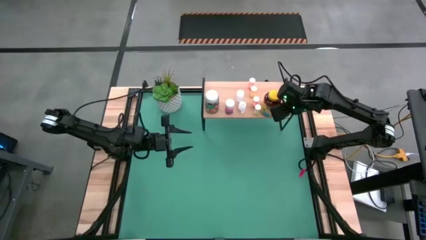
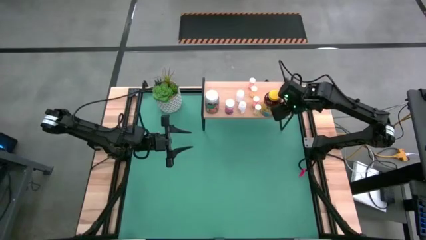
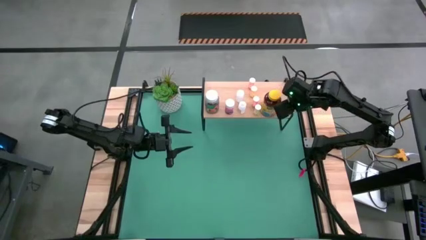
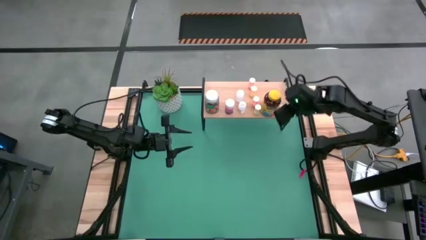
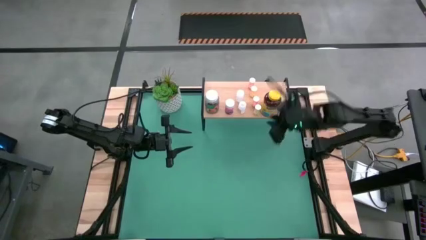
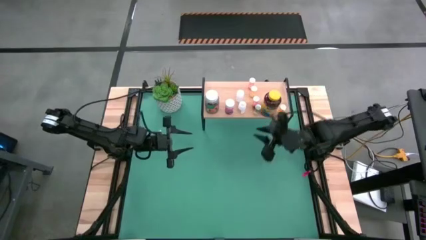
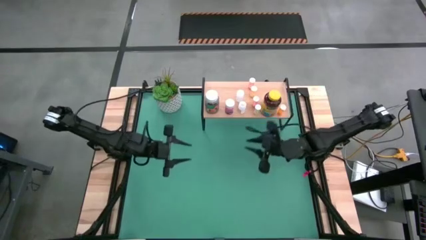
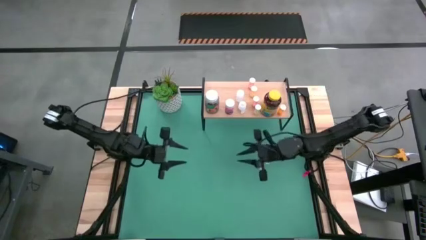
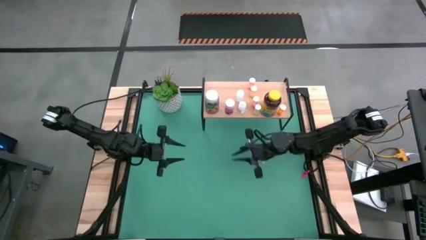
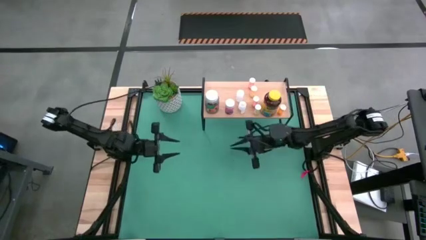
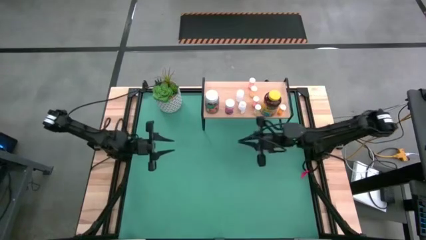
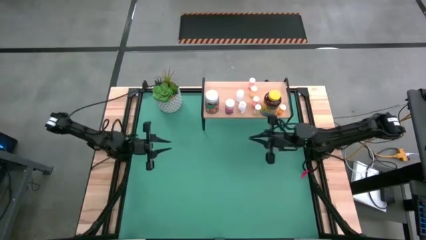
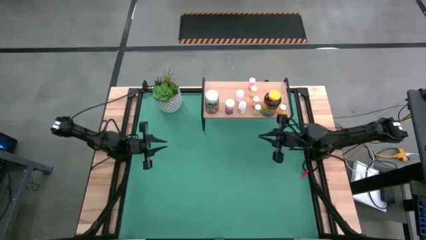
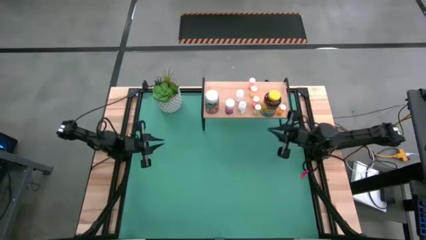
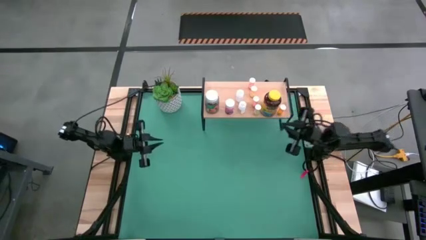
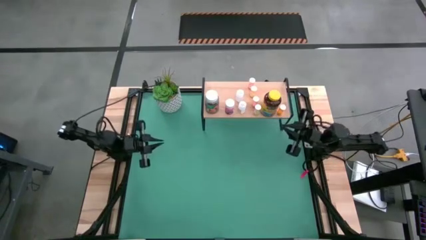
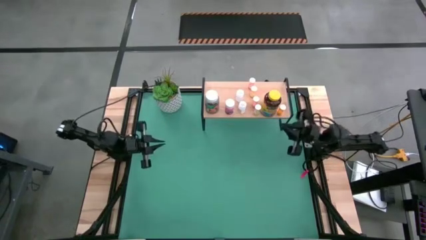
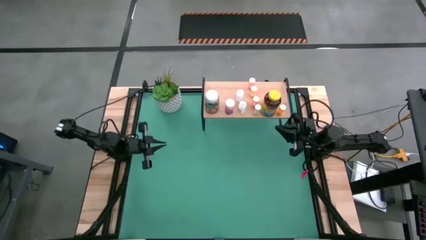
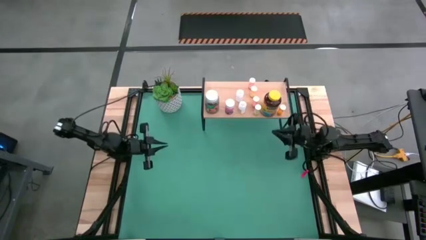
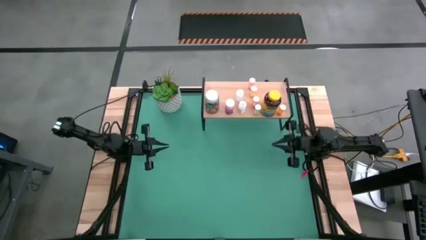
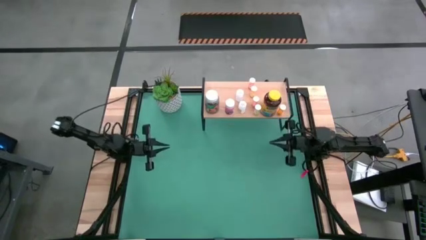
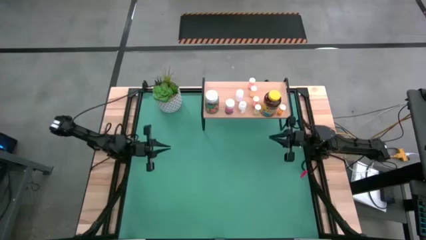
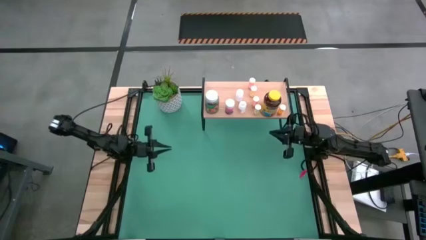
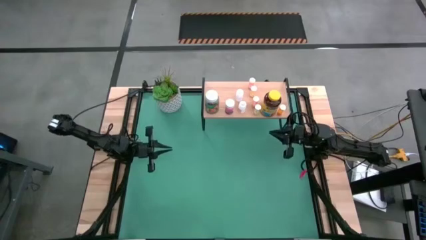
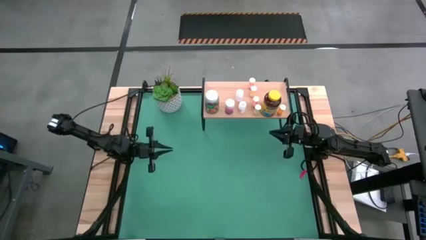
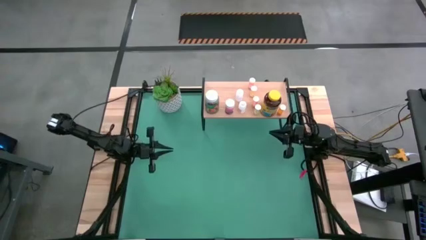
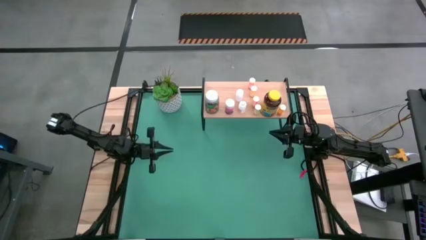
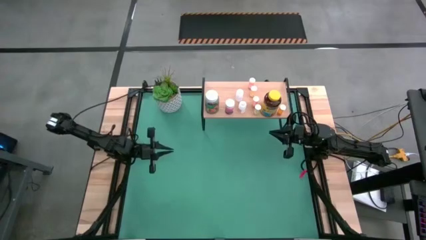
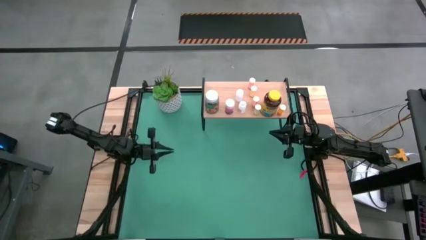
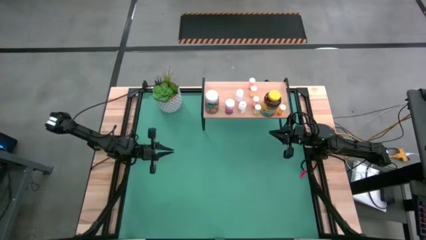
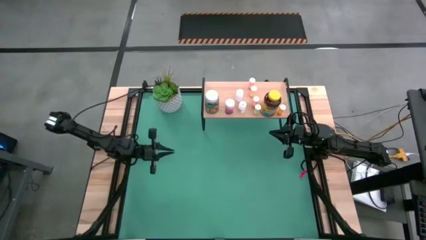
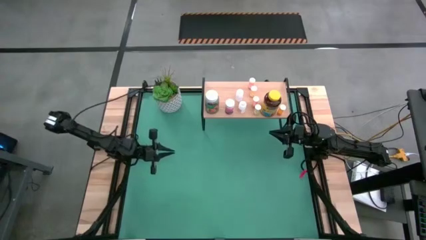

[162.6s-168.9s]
Task: Pick and place medicine bottles onto shelf by color
Return to Home Position

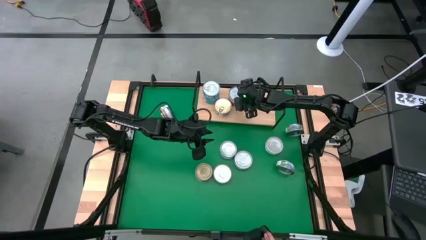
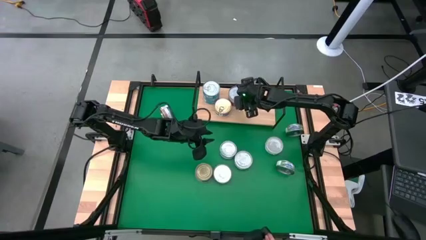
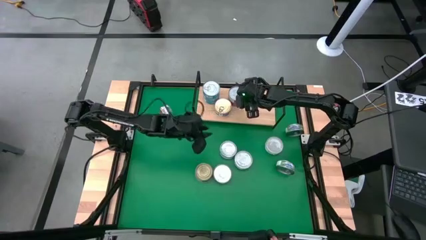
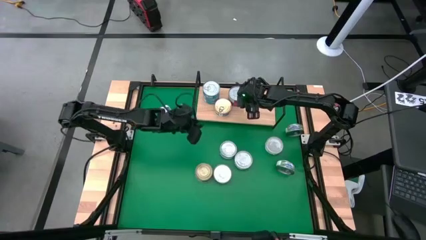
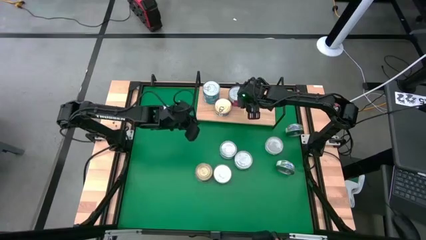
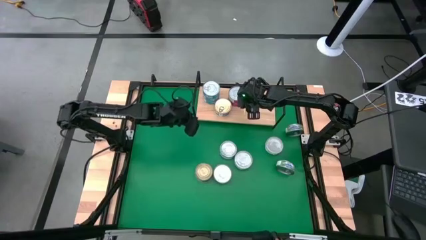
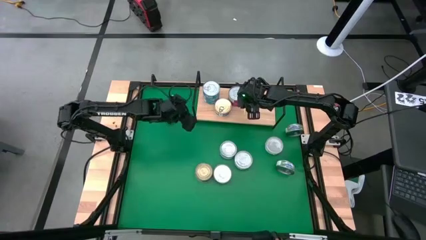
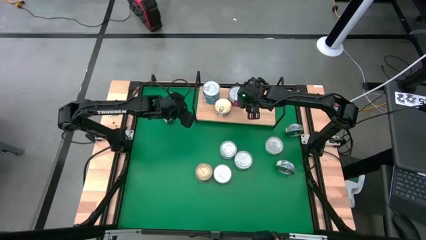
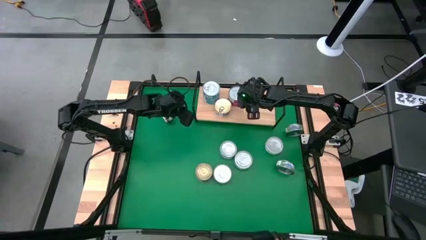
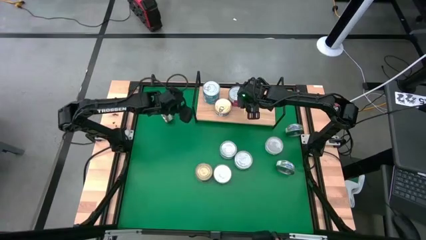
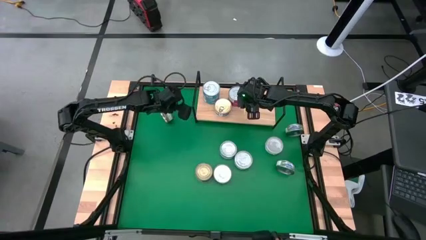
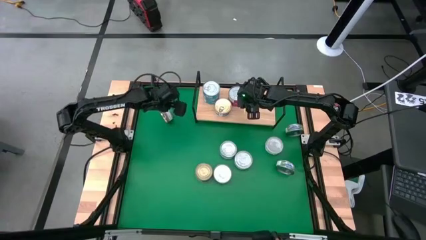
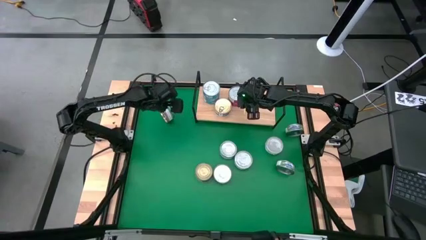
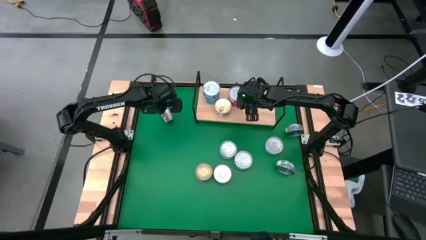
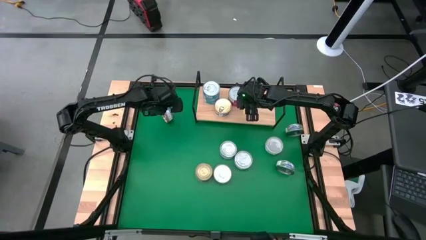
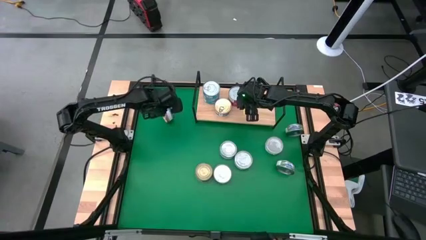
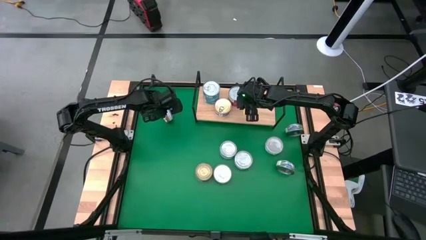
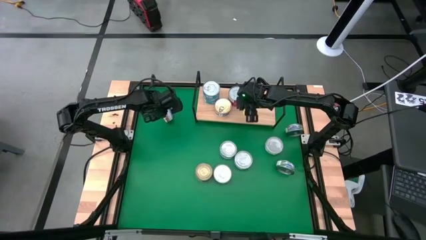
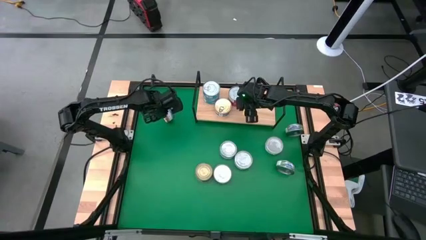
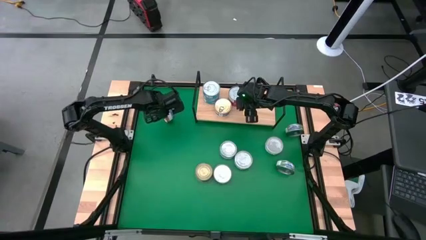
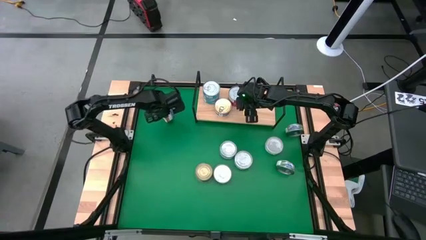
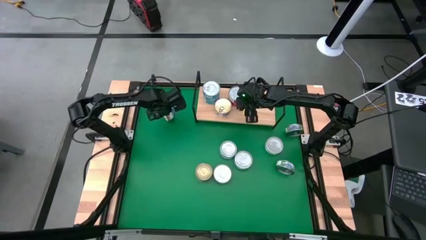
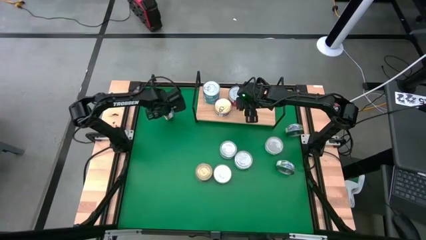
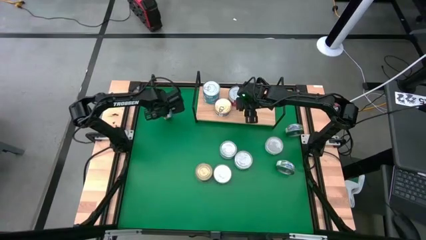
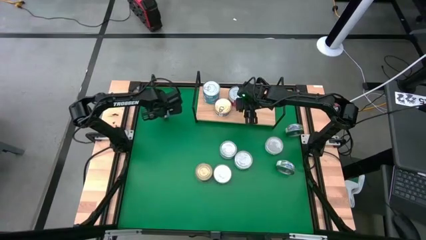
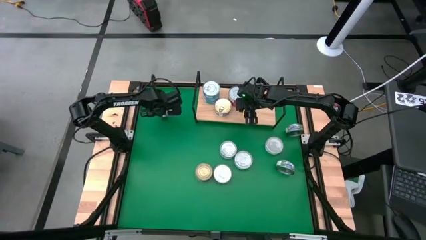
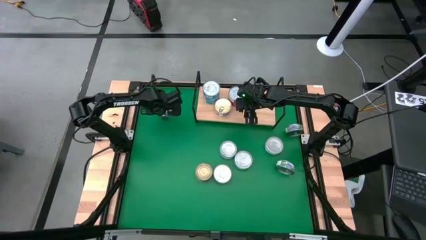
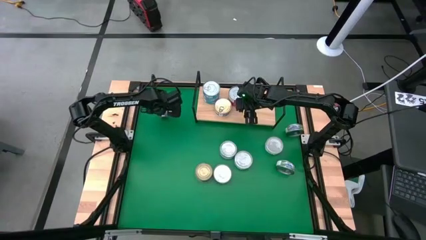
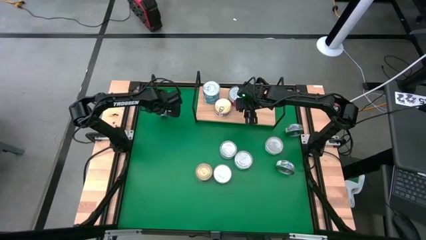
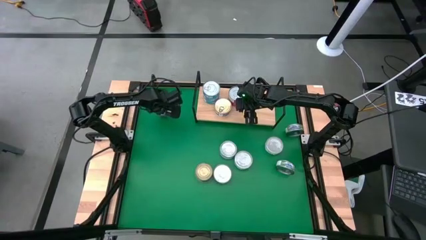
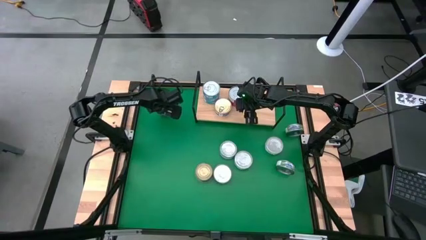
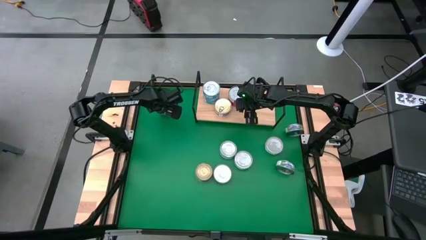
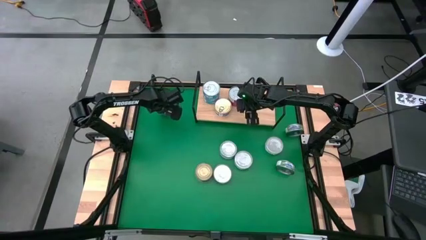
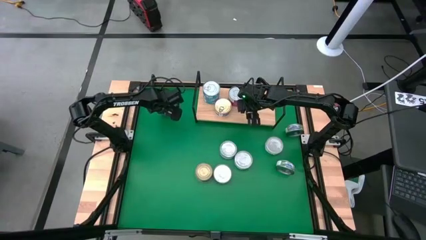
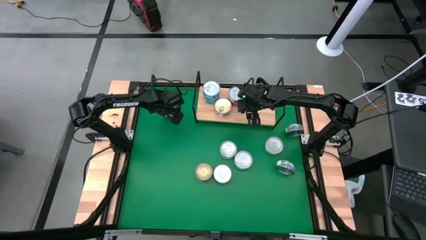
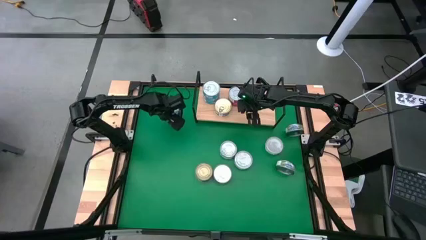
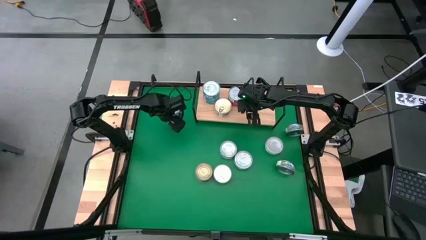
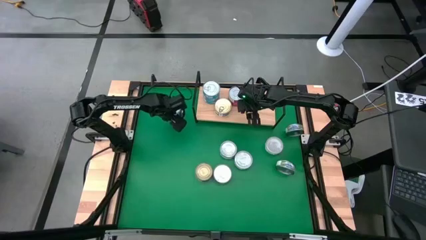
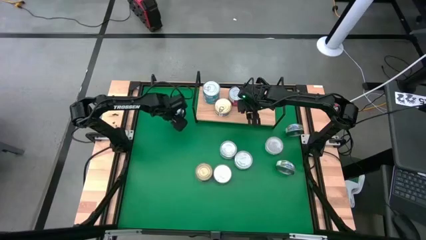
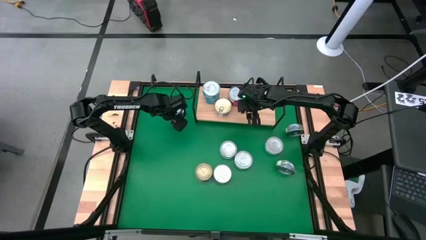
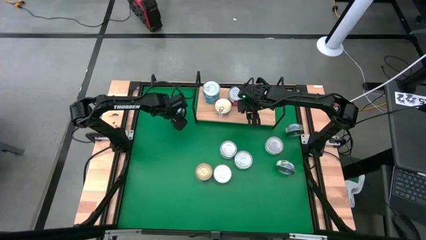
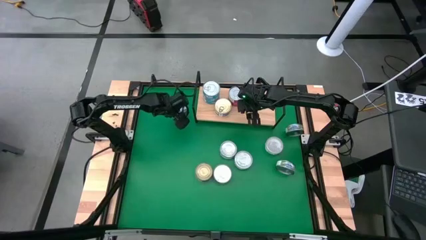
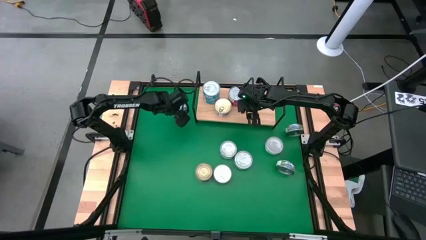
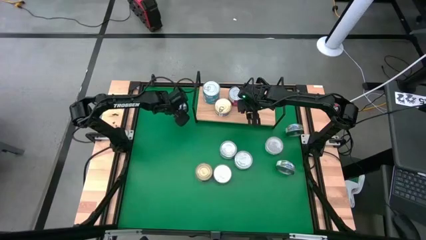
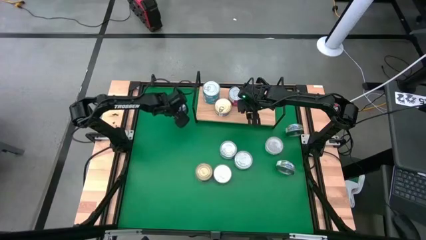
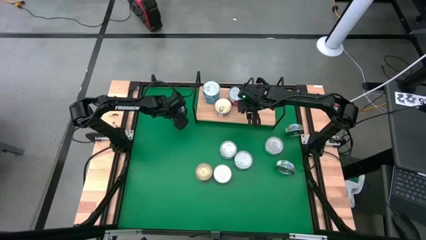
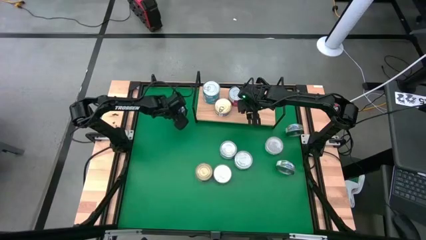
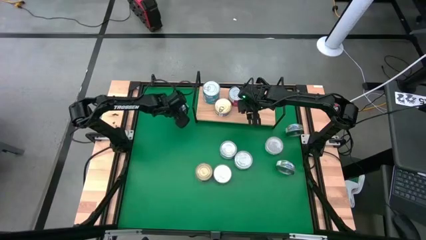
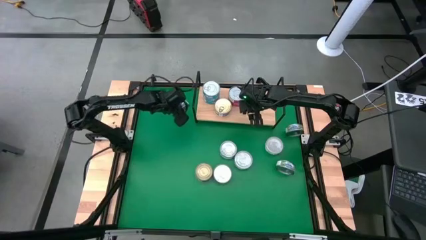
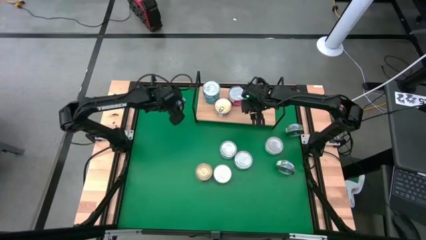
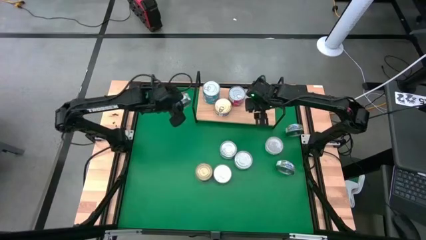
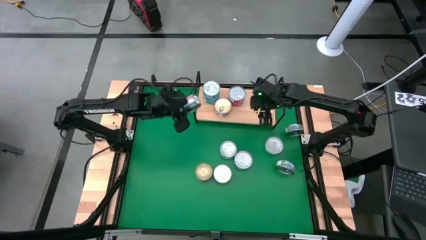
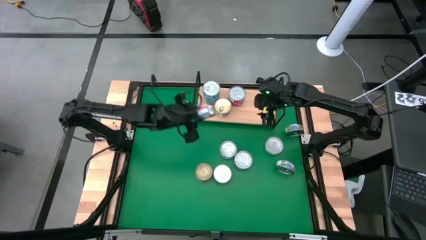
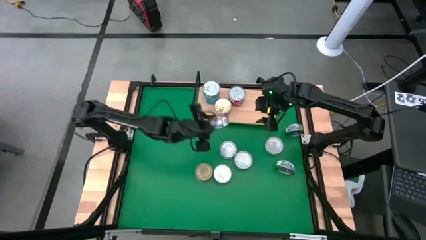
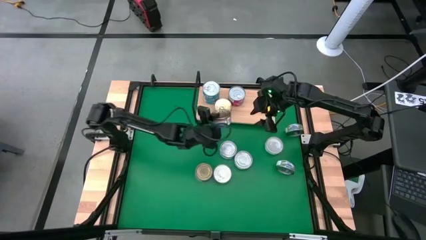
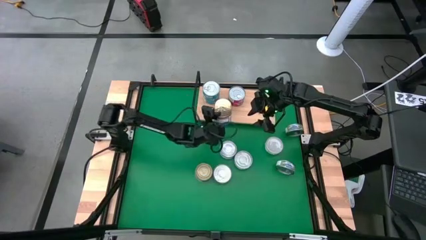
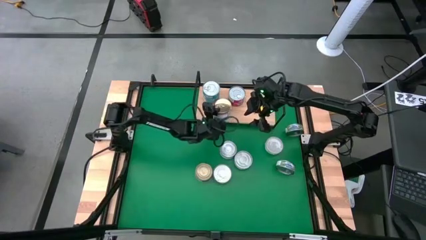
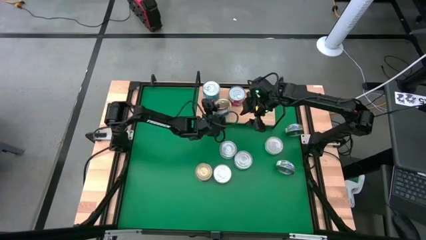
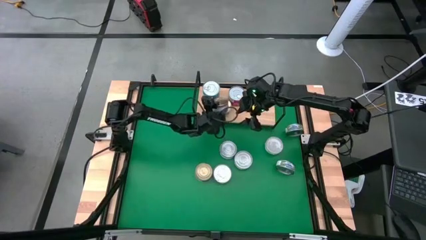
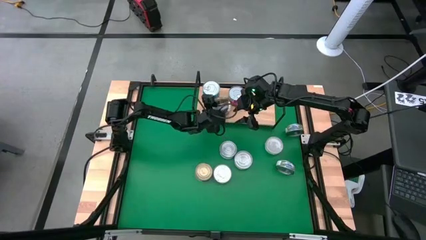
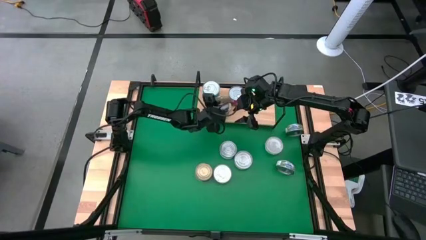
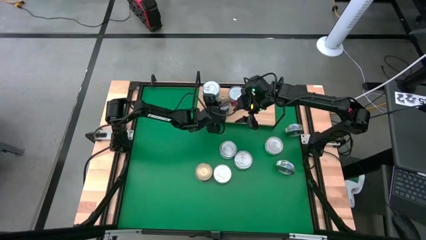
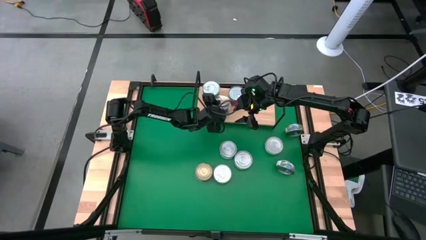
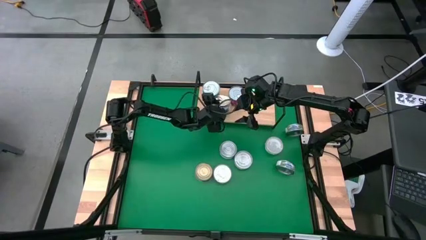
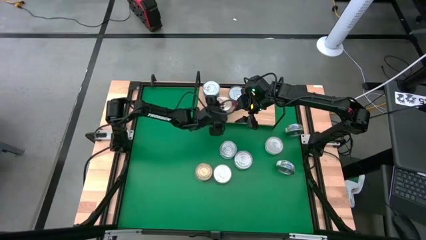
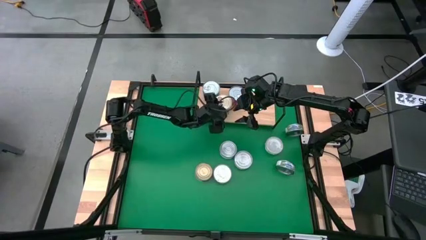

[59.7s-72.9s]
Task: Stack canned seafood by type on shelf
Stack the blue pink tuna can on top of the blue pink tuna can on the shelf
